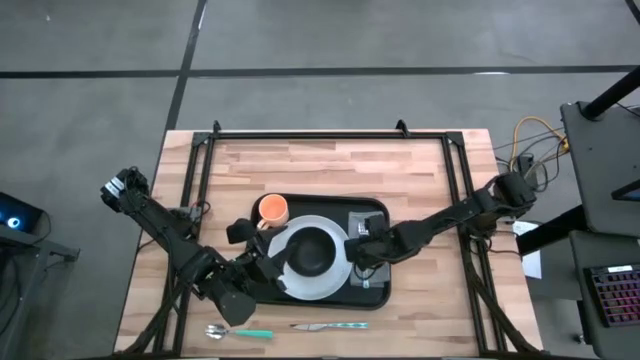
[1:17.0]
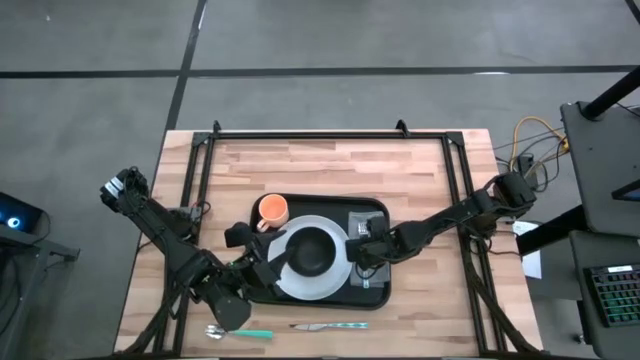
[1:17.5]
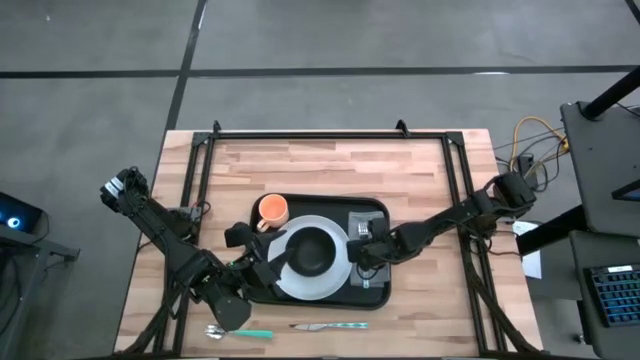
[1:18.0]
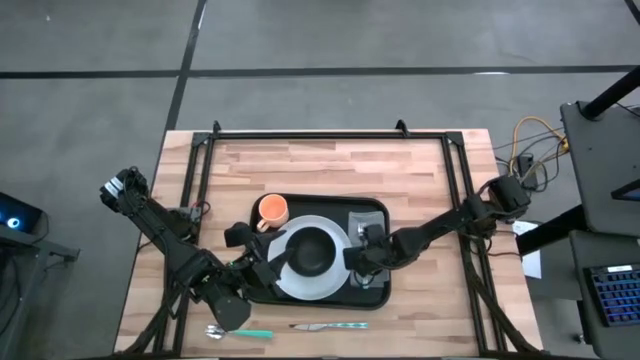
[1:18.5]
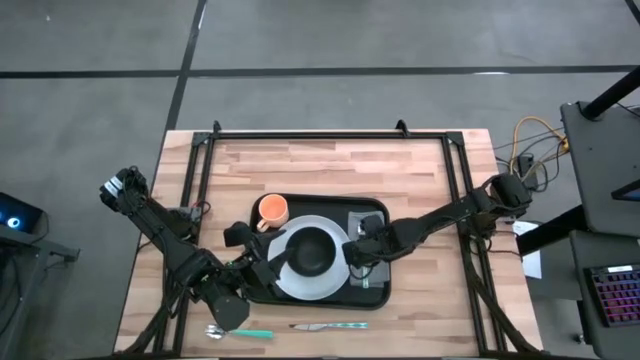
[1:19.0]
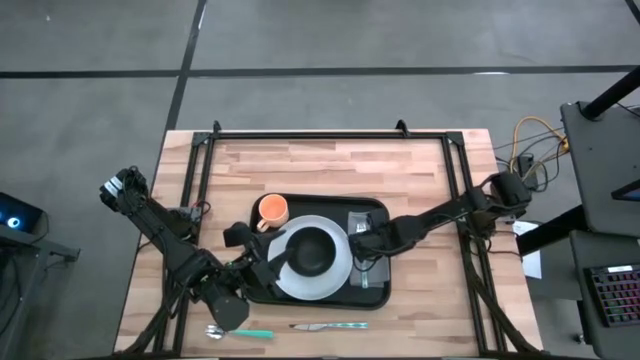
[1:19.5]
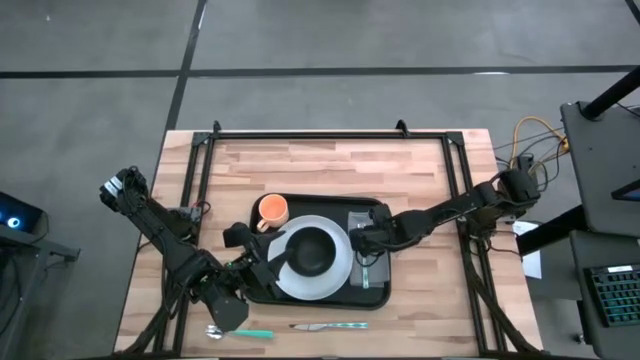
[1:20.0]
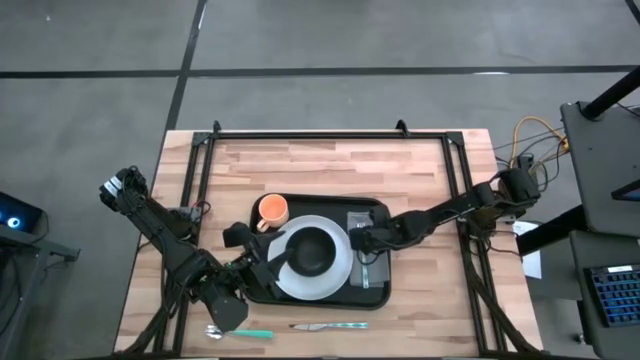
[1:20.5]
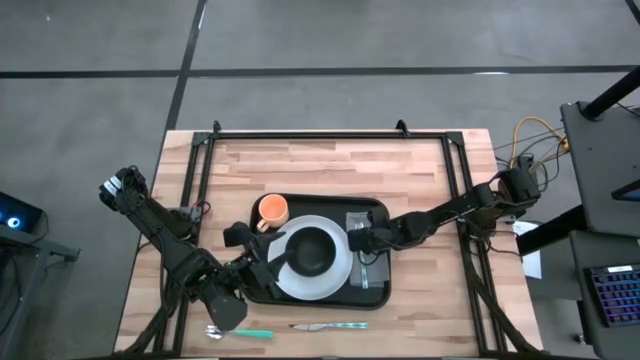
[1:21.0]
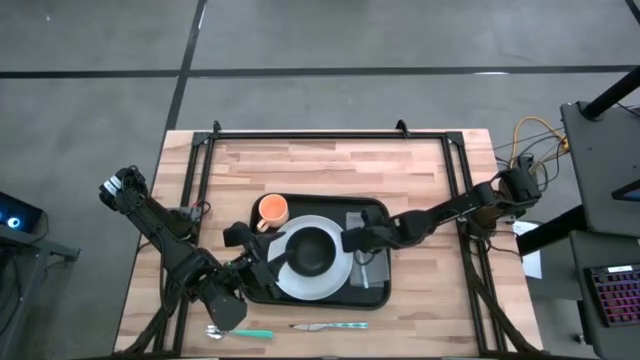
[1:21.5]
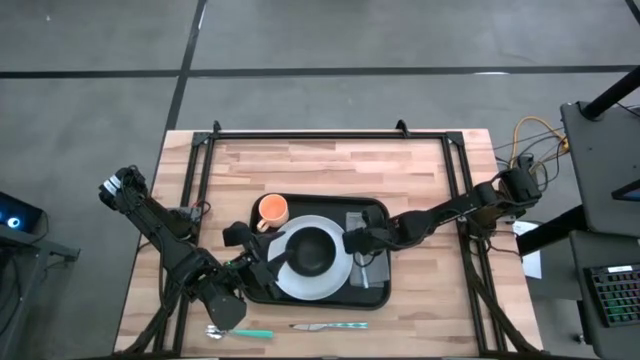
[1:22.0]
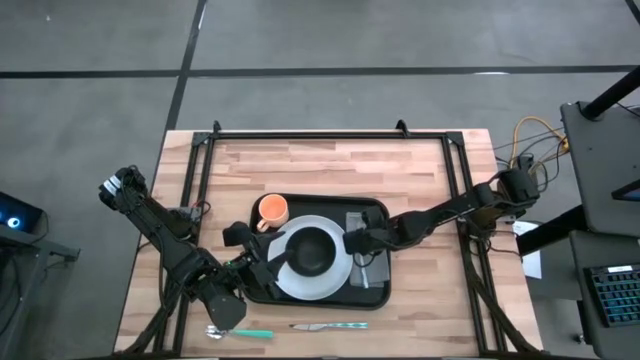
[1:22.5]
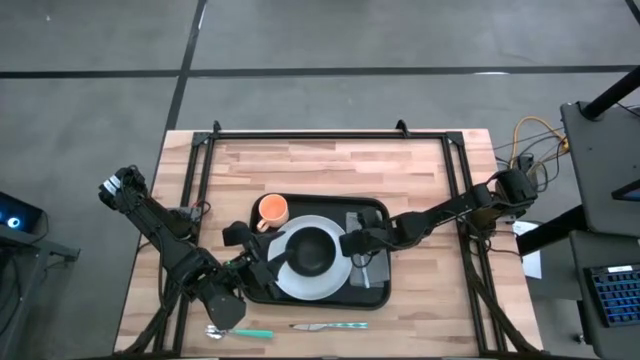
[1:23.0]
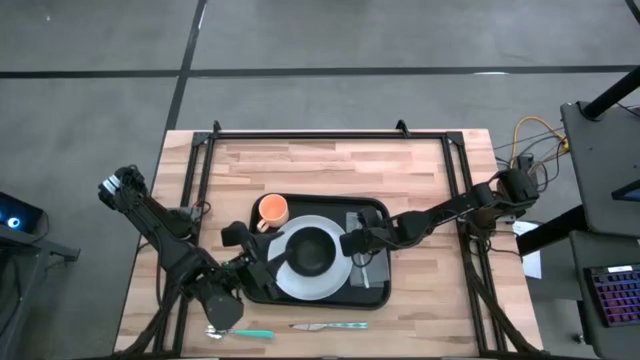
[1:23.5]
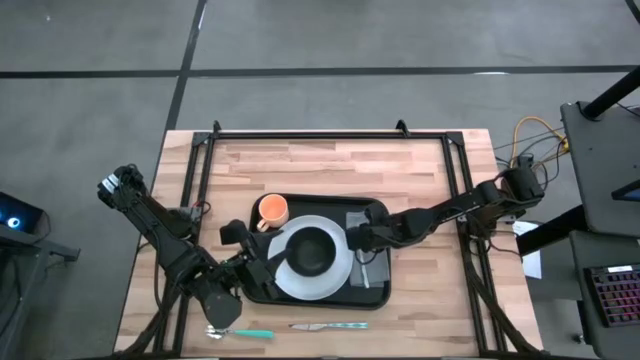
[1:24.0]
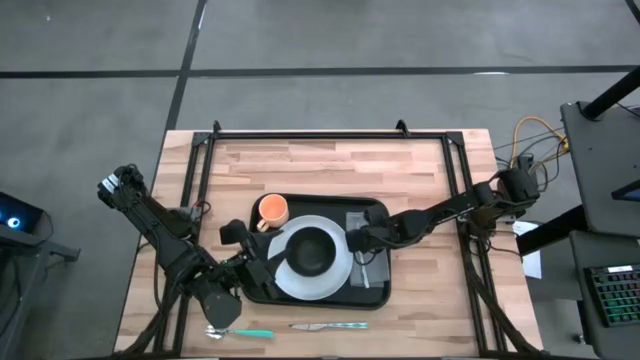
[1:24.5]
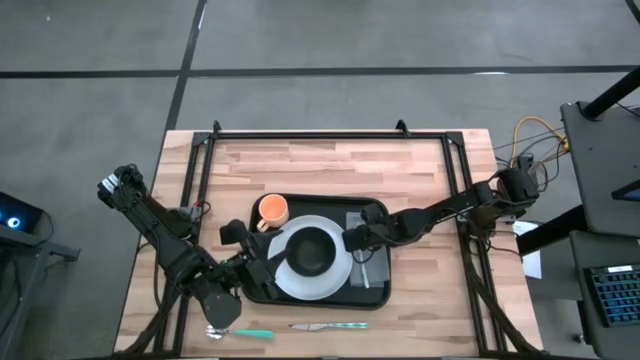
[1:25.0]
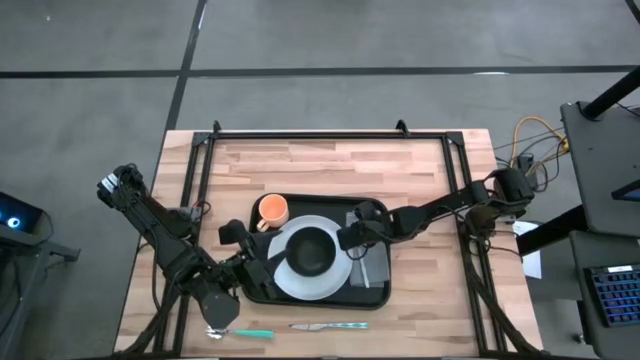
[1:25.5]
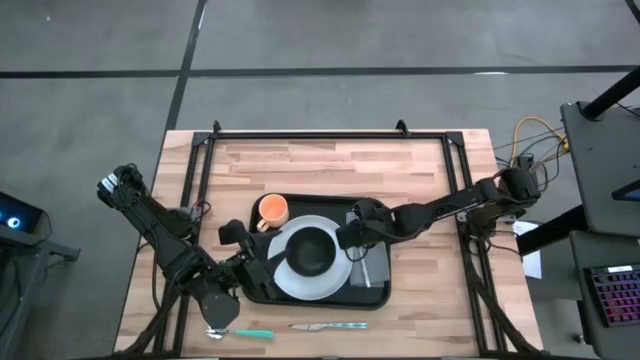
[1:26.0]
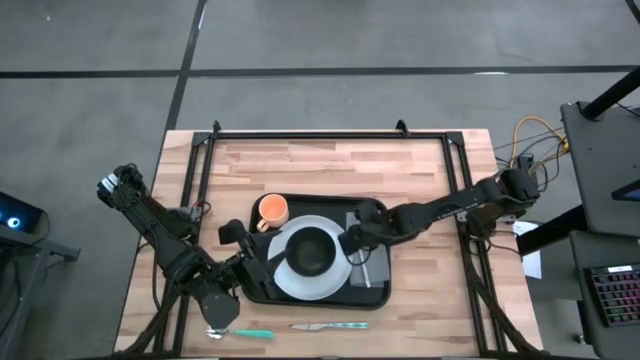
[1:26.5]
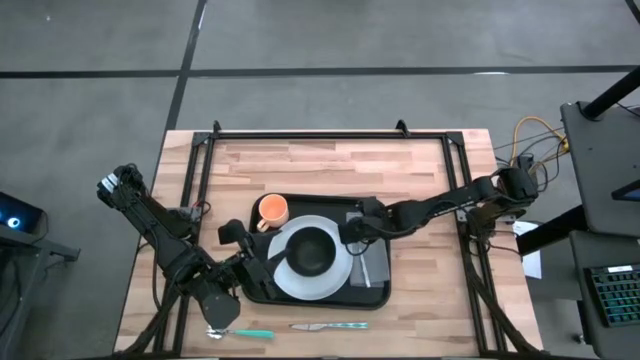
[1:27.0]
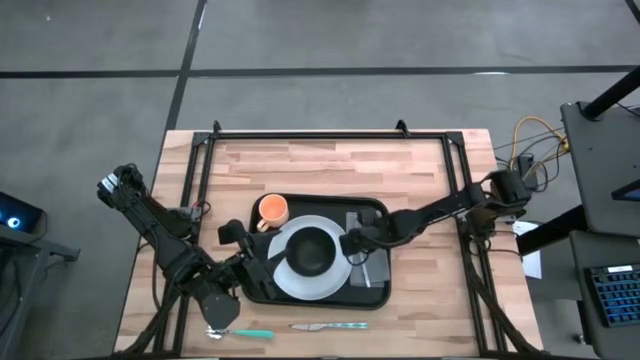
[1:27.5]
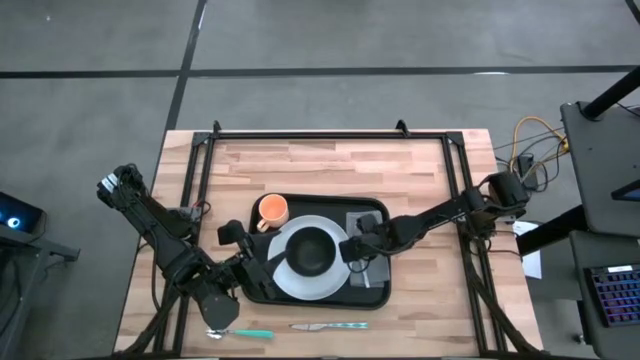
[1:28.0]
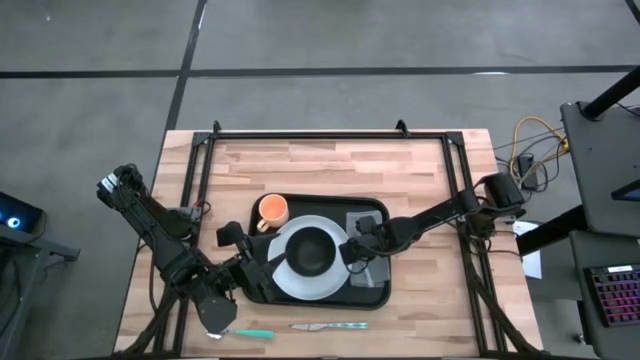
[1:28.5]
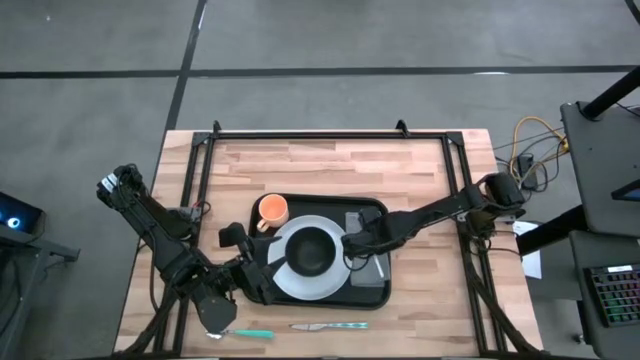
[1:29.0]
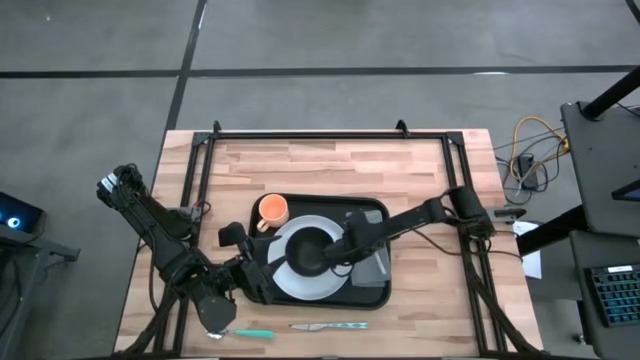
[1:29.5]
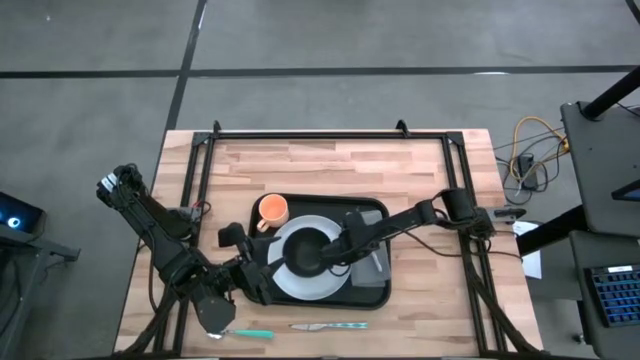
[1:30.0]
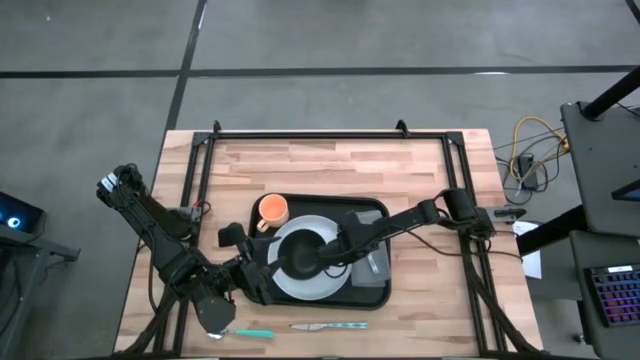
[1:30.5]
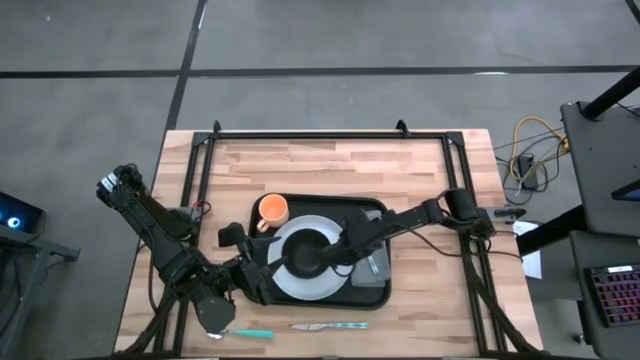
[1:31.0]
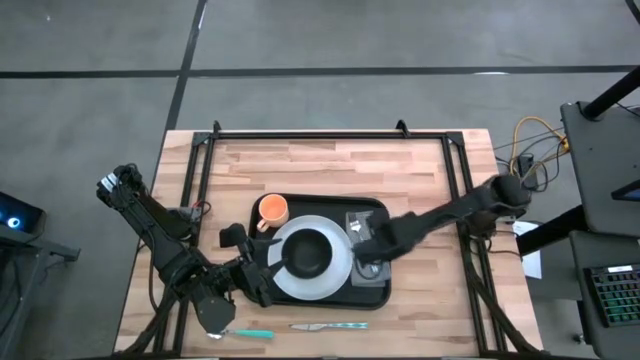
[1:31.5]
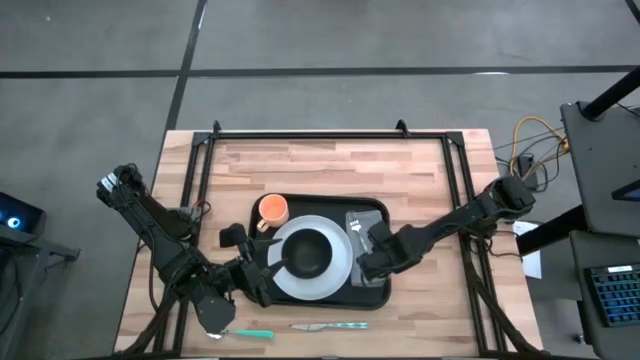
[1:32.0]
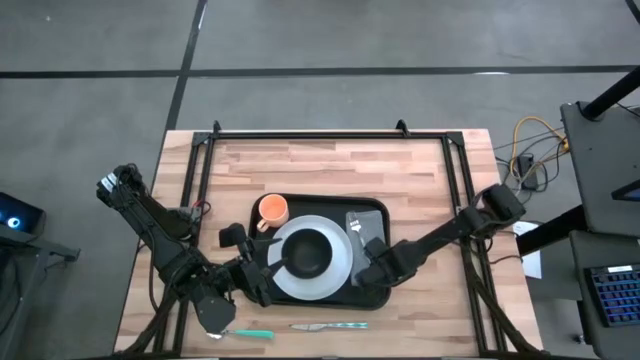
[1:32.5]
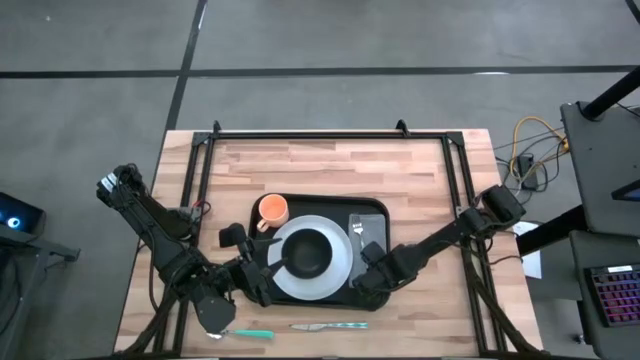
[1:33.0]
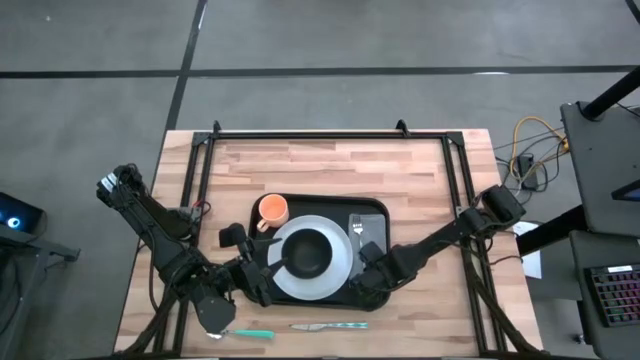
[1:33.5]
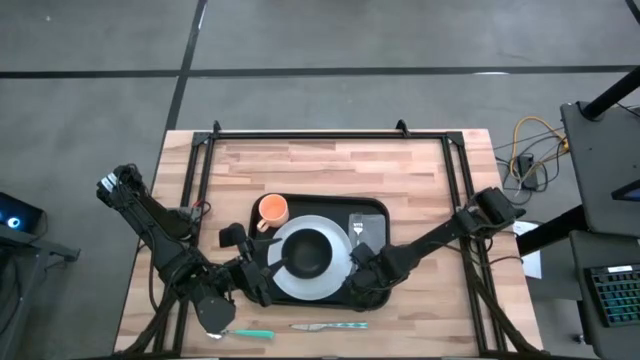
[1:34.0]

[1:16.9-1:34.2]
Task: Set up tray
Put the blue fork on top of the gray napkin

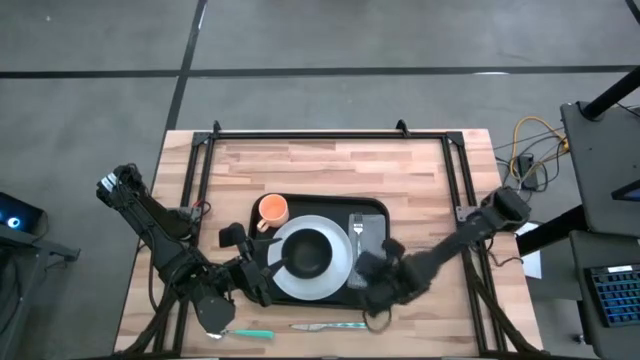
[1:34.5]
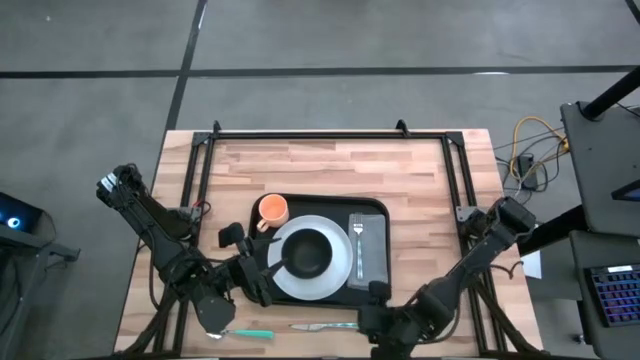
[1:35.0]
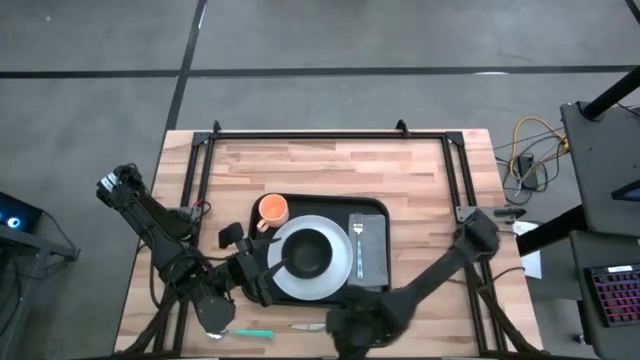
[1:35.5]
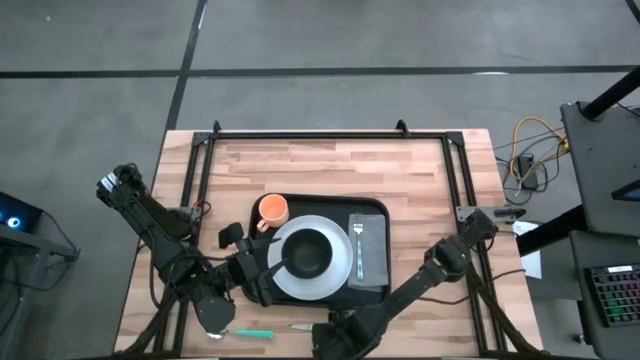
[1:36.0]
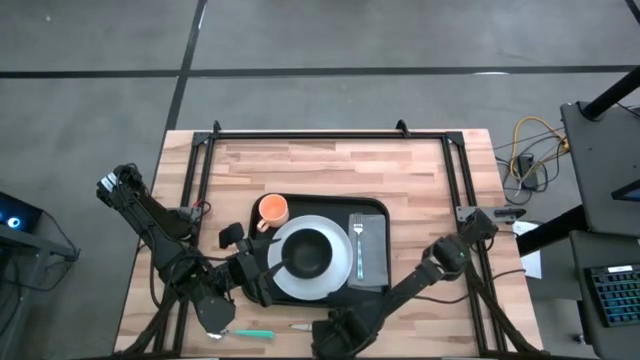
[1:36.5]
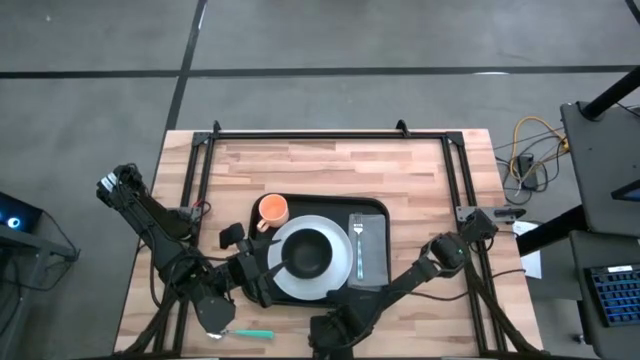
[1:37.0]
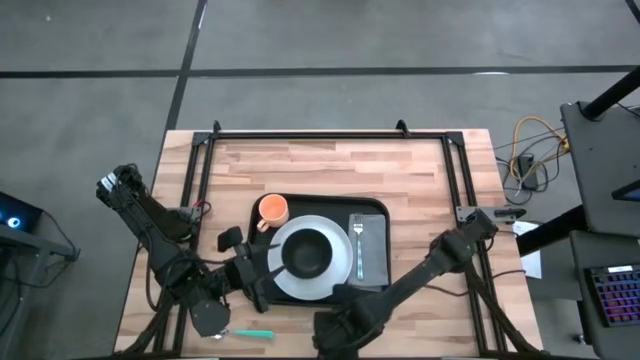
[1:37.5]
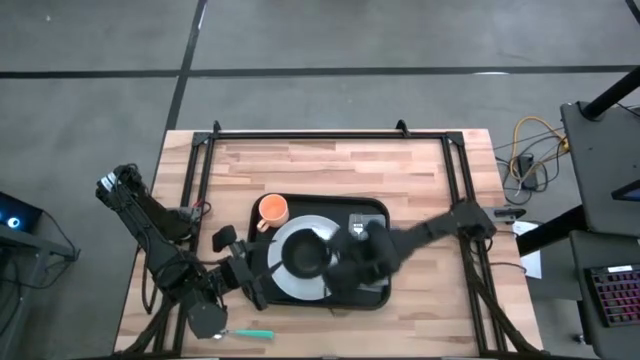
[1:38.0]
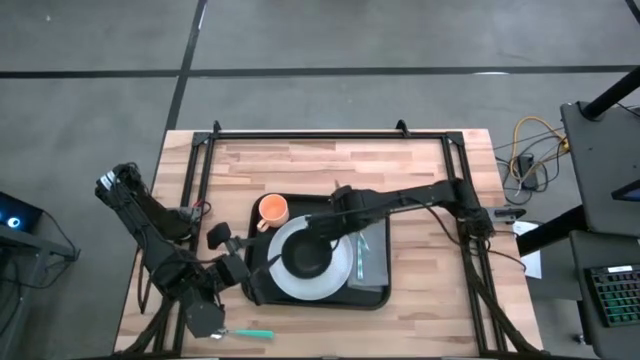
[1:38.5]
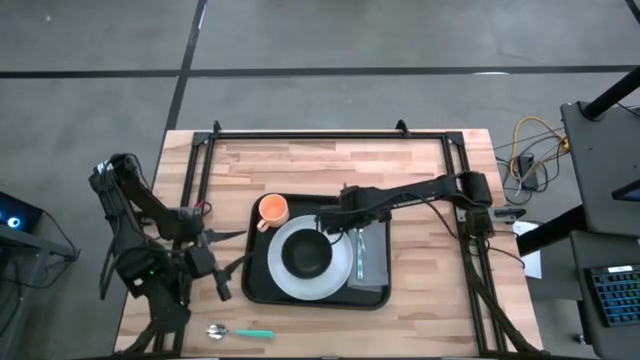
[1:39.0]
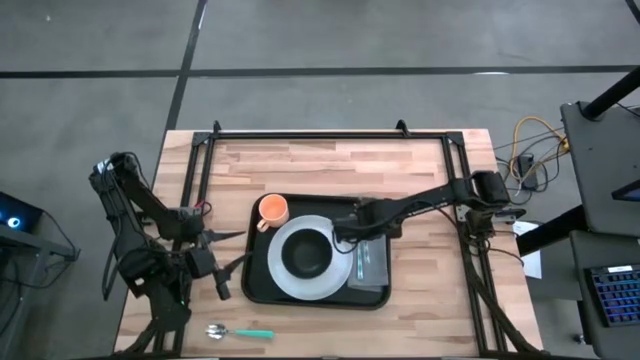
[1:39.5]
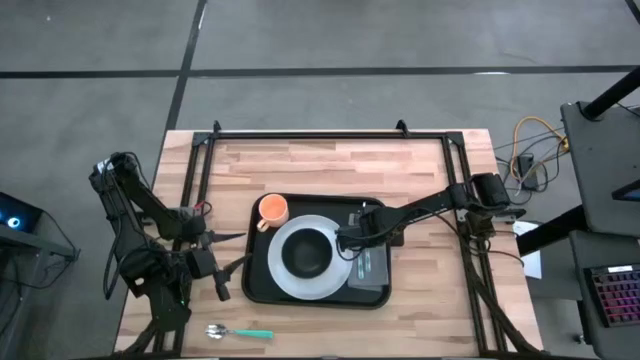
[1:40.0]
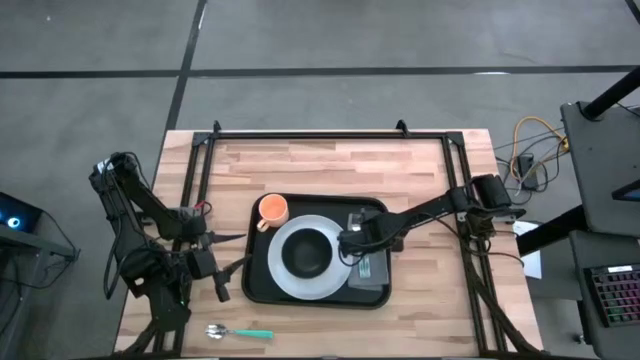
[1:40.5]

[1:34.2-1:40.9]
Put the blue knife on top of the gray napkin to the right of the blue fork
